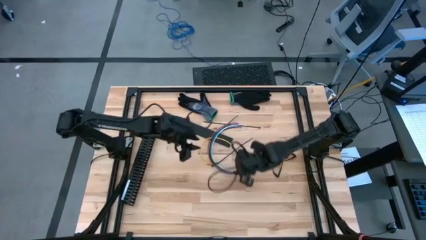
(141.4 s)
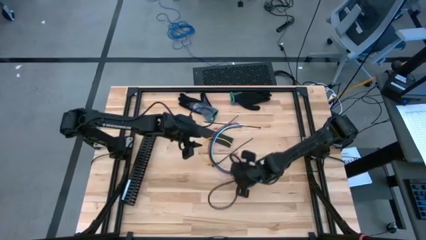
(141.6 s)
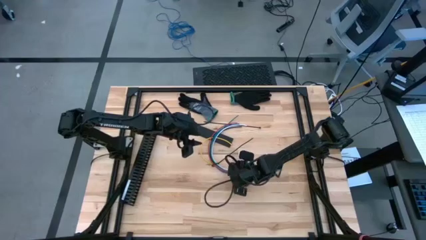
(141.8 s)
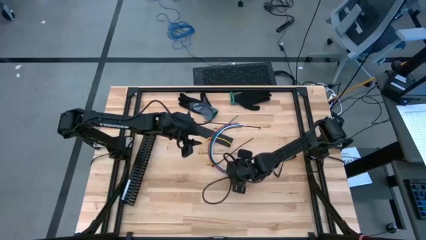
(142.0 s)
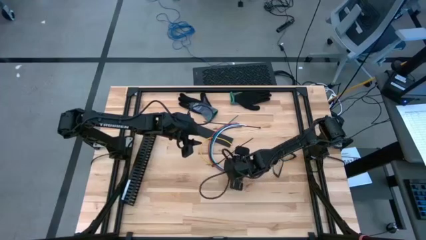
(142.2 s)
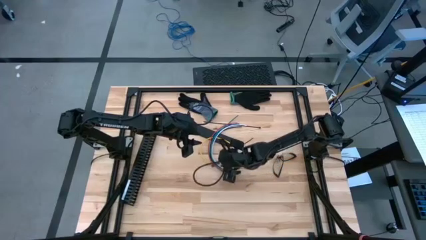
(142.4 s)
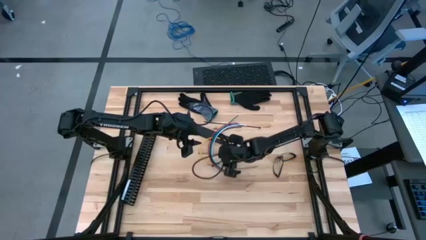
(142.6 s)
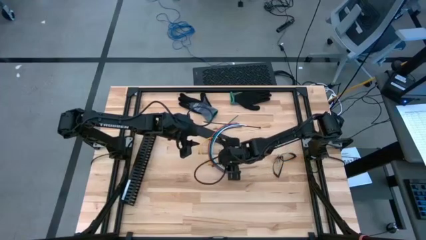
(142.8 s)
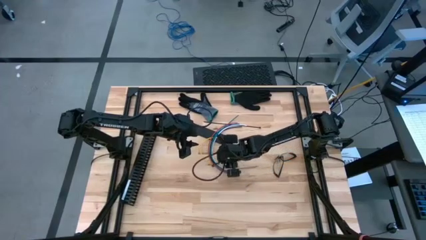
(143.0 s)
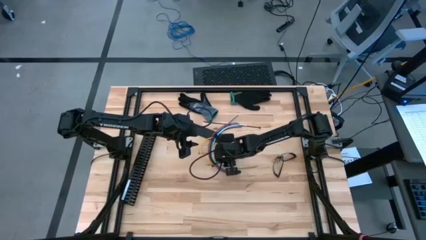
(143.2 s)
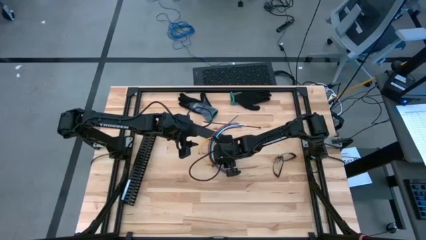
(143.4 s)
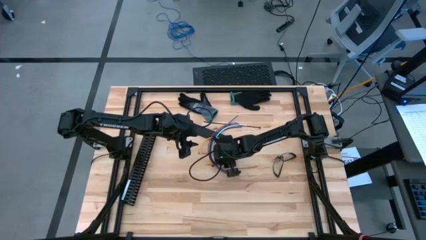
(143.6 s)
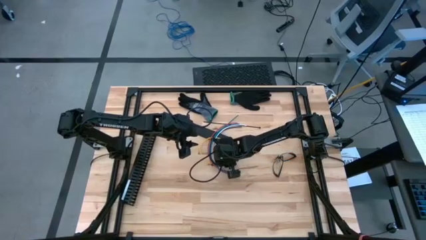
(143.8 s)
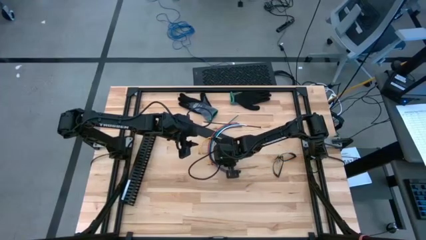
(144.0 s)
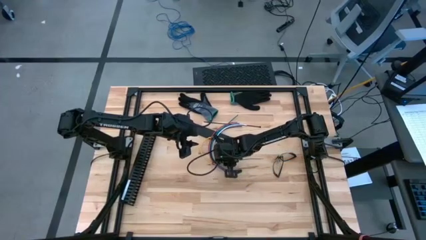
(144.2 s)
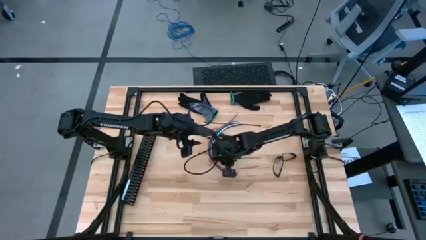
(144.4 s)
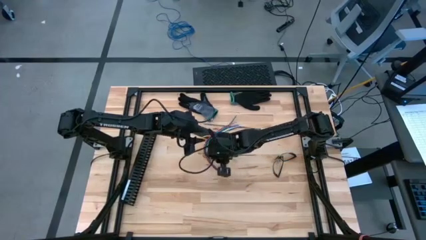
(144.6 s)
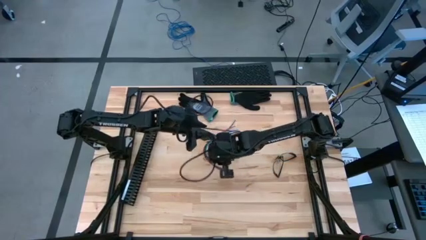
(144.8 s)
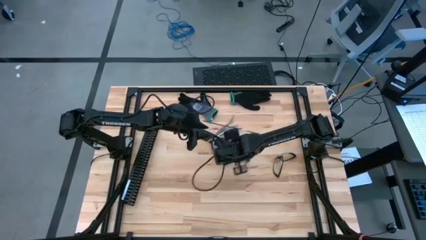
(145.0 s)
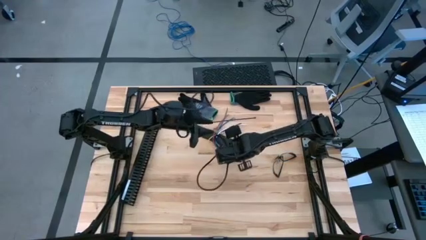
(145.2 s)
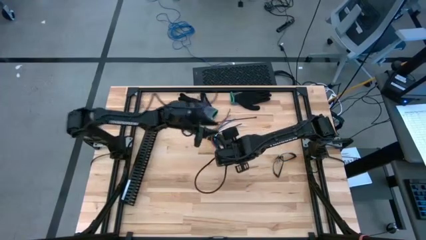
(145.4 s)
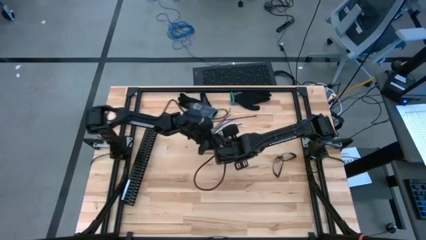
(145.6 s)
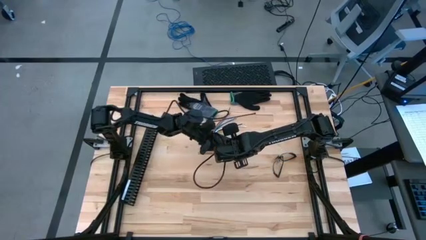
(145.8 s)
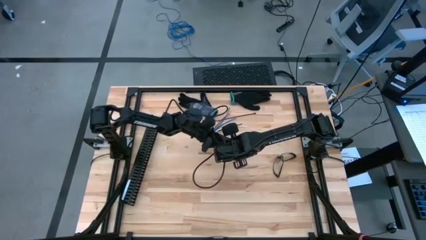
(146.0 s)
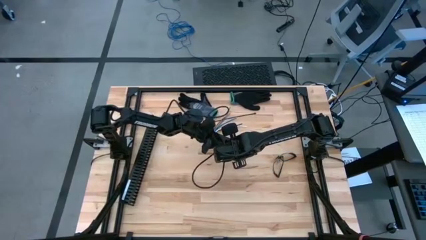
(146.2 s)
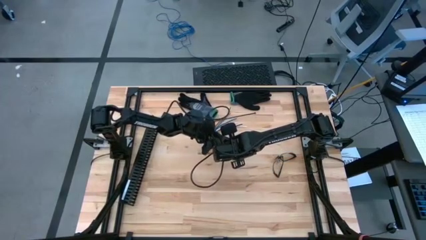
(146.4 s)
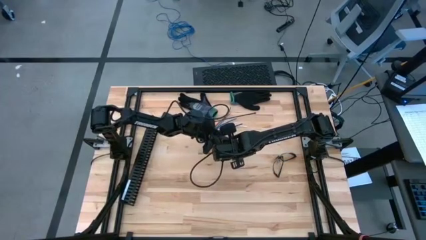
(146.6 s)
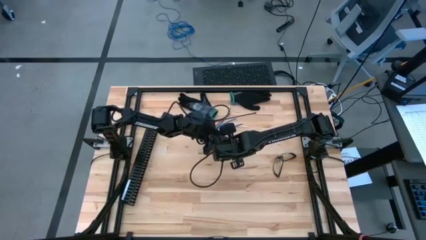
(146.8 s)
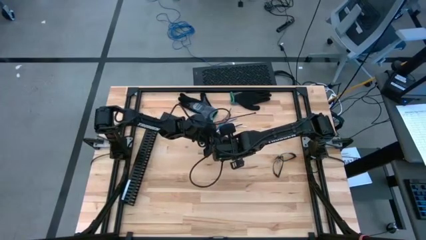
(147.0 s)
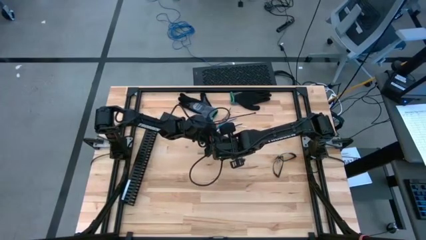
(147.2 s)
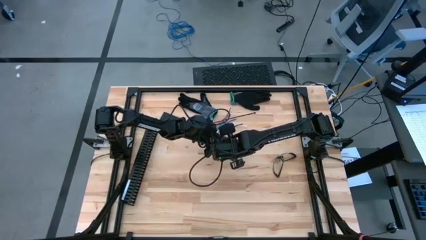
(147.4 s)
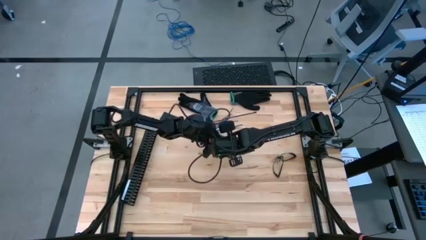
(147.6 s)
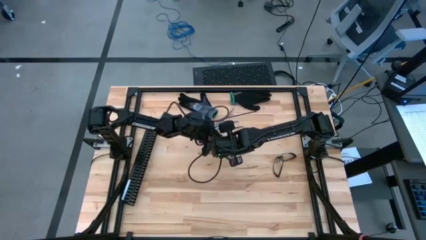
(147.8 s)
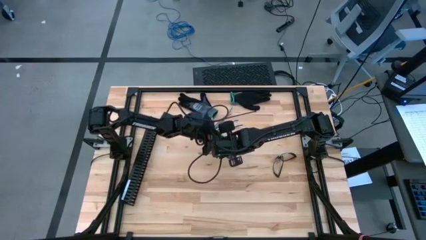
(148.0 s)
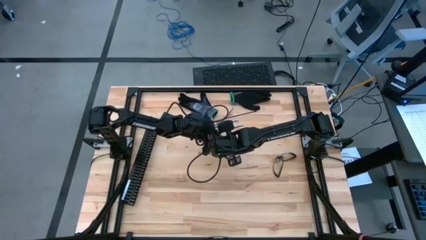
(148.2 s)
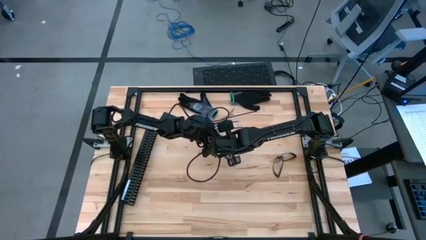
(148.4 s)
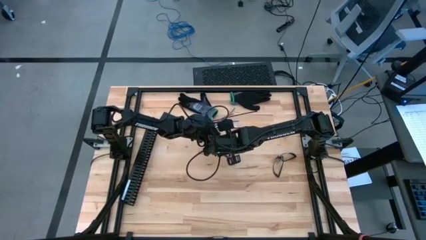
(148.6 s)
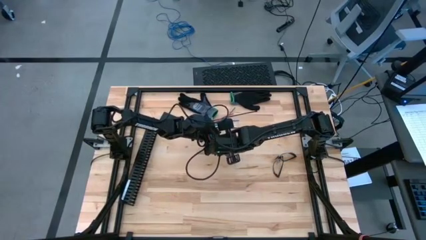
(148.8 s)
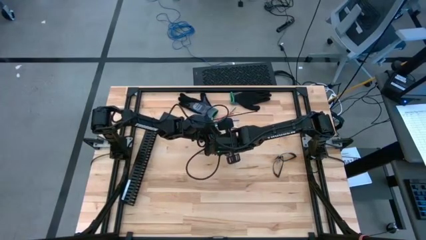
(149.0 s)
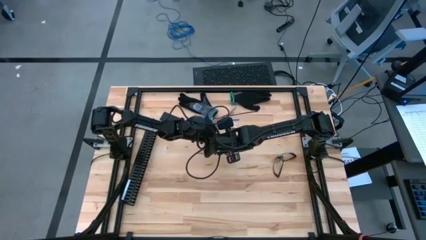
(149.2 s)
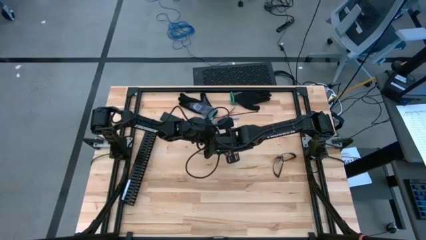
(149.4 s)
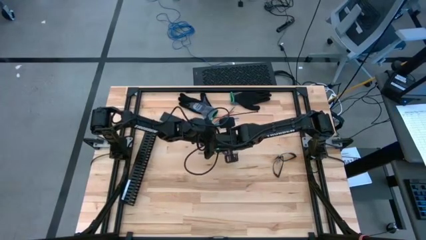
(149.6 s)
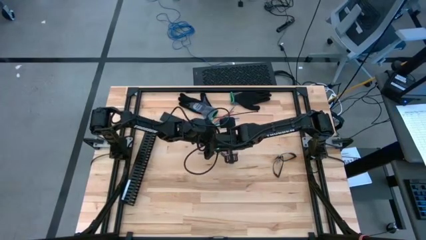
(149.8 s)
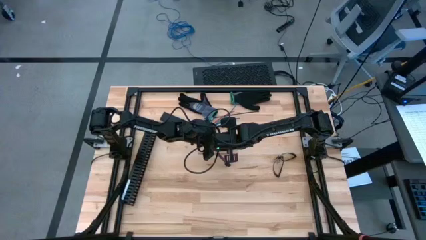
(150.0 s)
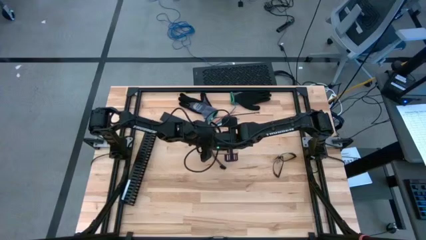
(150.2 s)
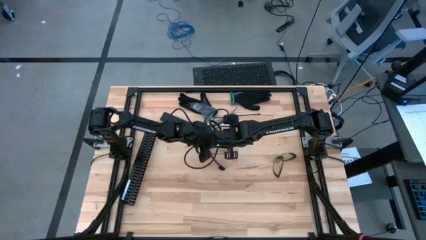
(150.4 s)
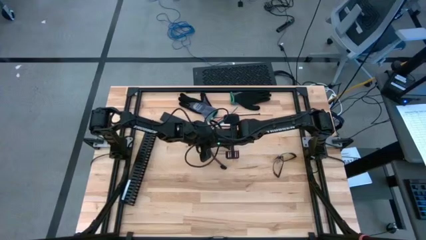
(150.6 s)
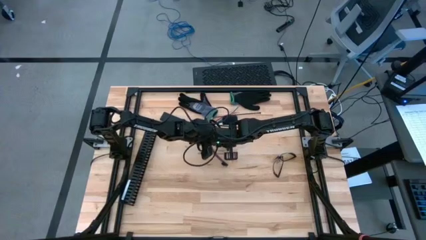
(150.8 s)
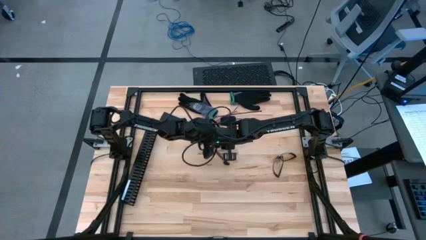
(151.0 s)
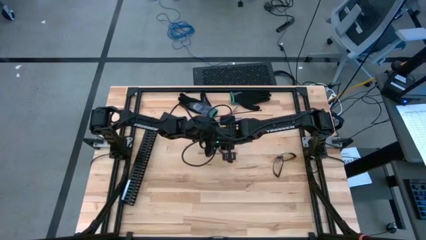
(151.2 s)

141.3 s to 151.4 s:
Task: Ziptie cables
Wrap the cables using a black zip tie
